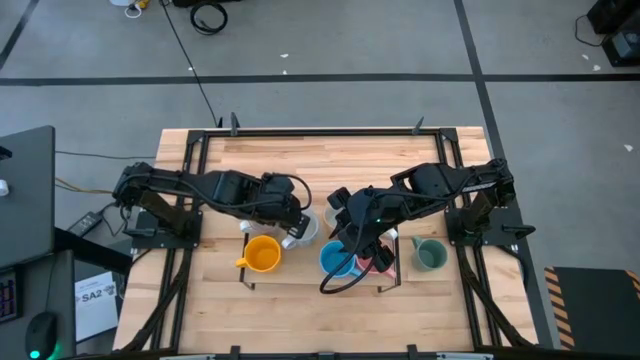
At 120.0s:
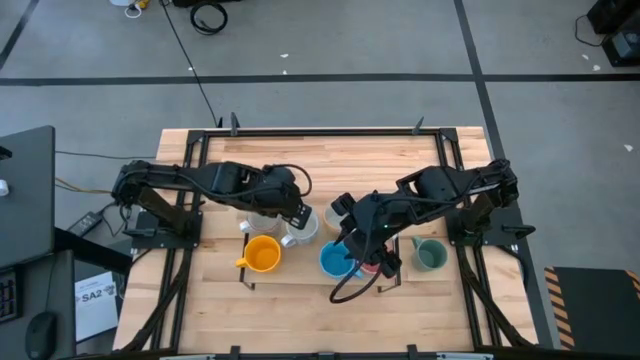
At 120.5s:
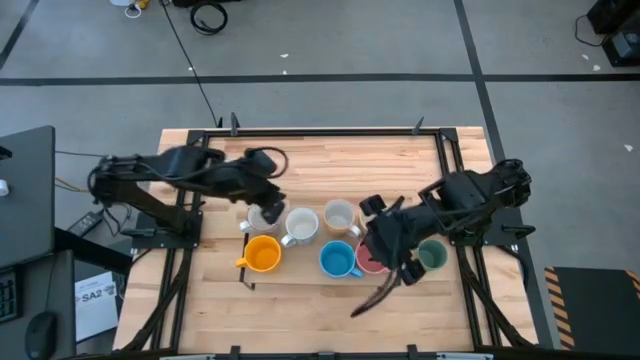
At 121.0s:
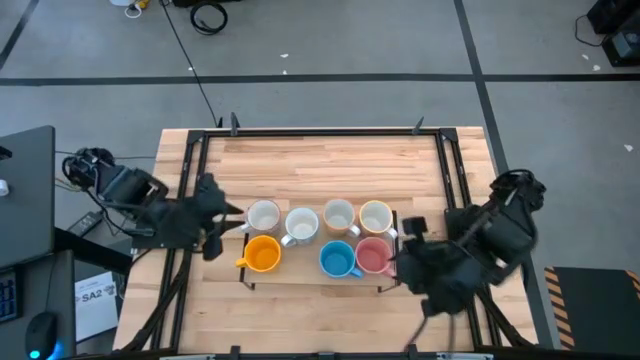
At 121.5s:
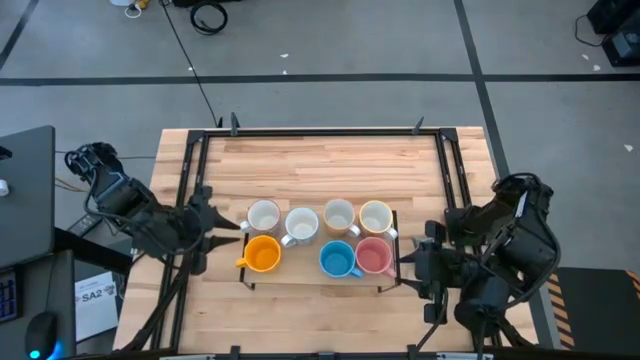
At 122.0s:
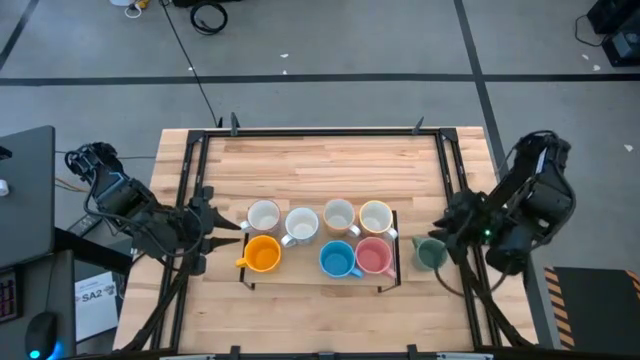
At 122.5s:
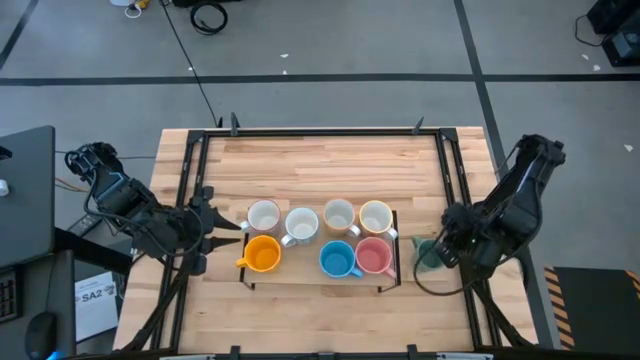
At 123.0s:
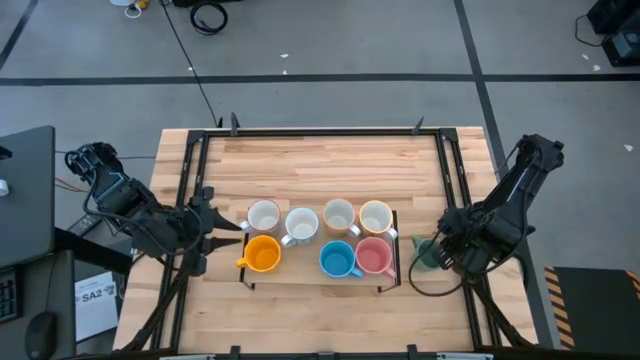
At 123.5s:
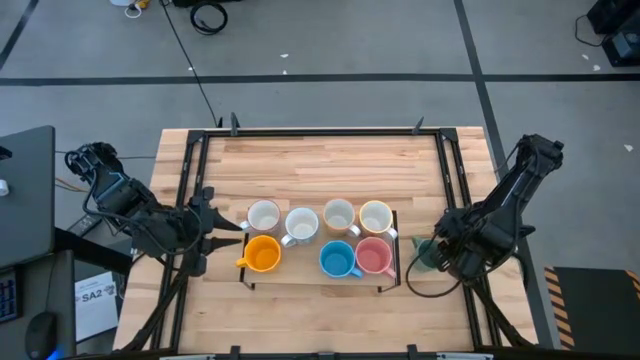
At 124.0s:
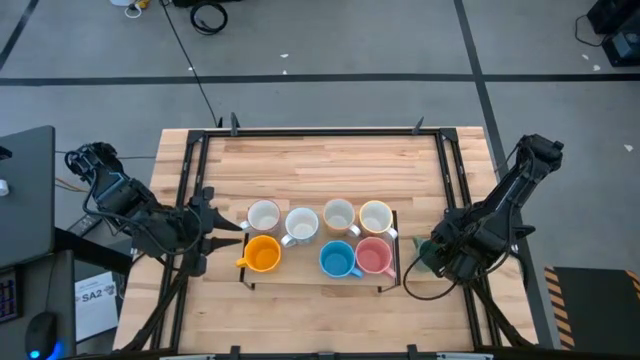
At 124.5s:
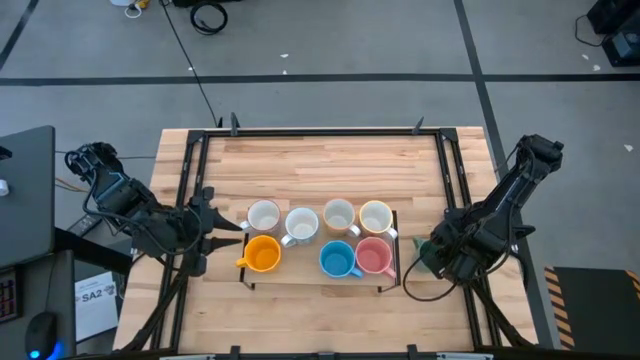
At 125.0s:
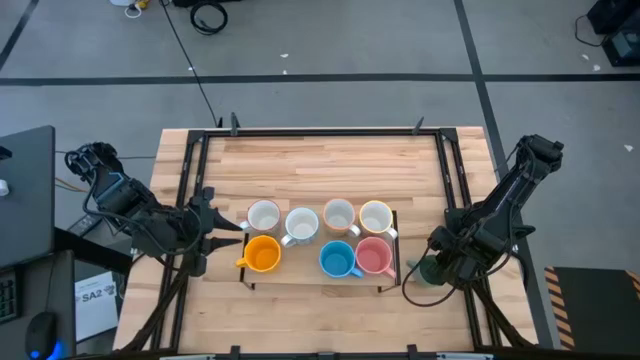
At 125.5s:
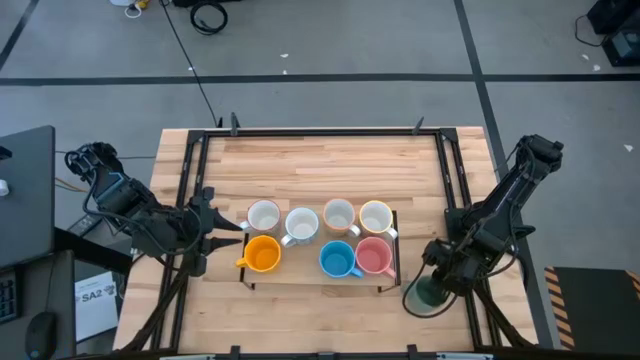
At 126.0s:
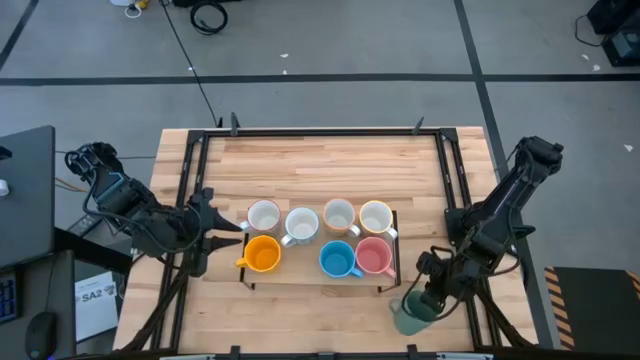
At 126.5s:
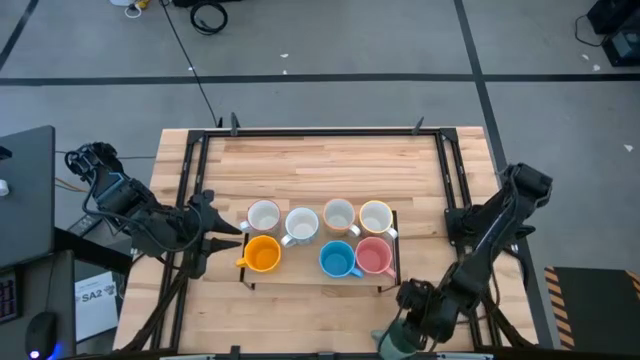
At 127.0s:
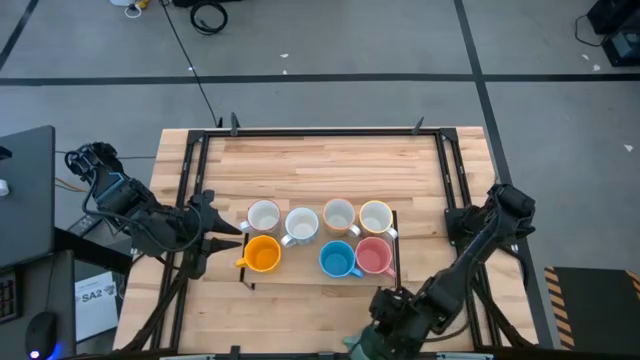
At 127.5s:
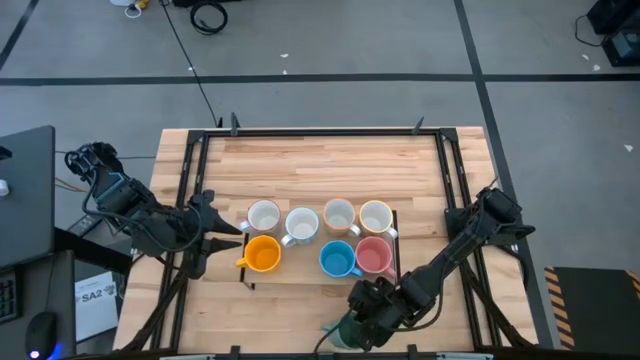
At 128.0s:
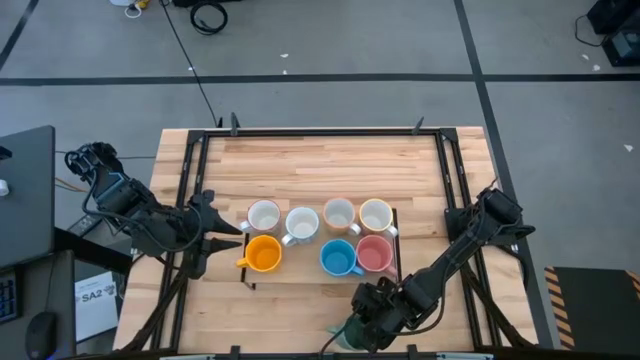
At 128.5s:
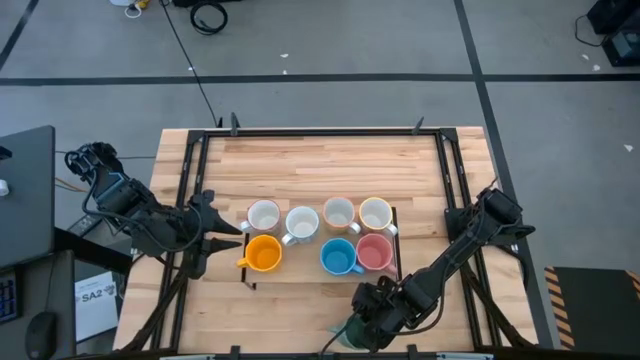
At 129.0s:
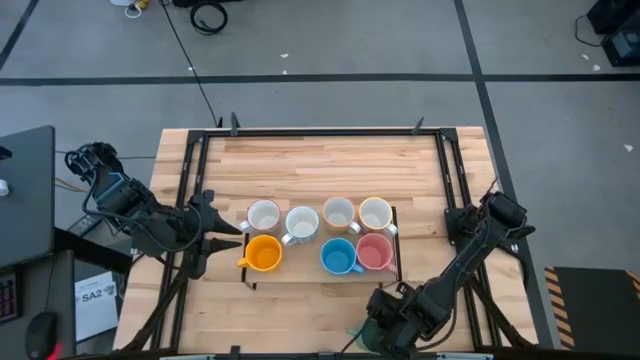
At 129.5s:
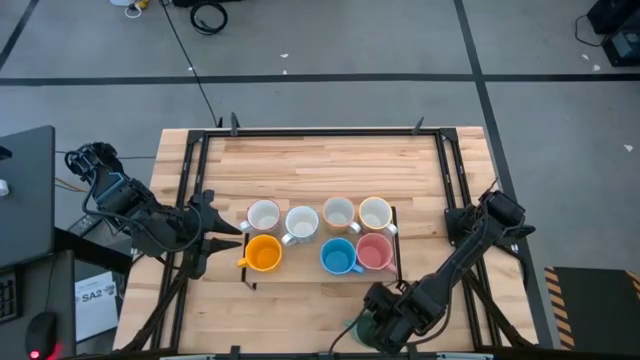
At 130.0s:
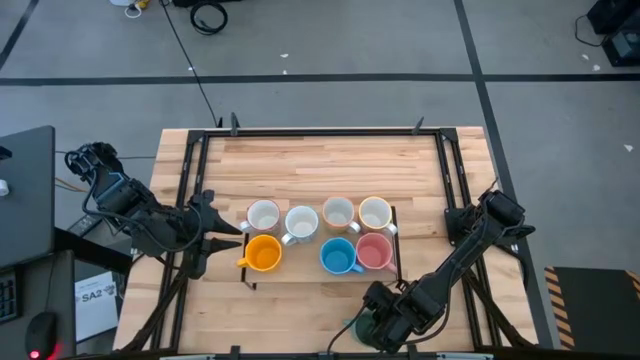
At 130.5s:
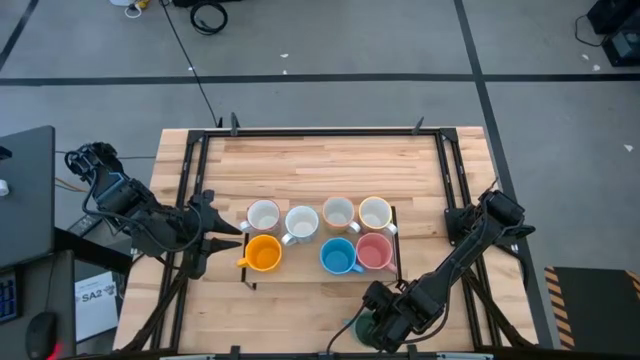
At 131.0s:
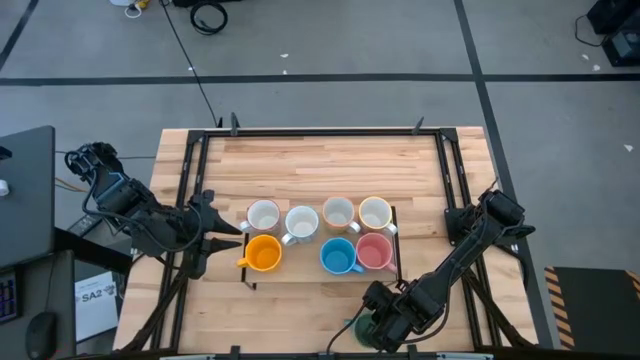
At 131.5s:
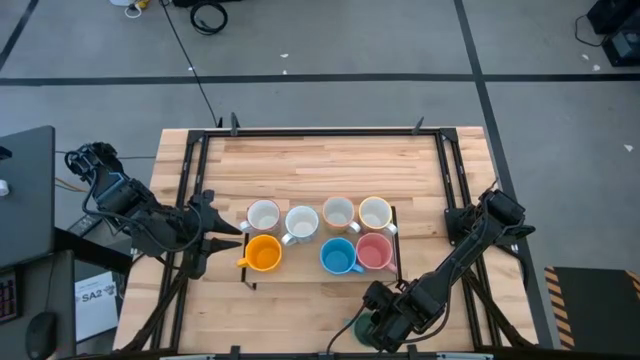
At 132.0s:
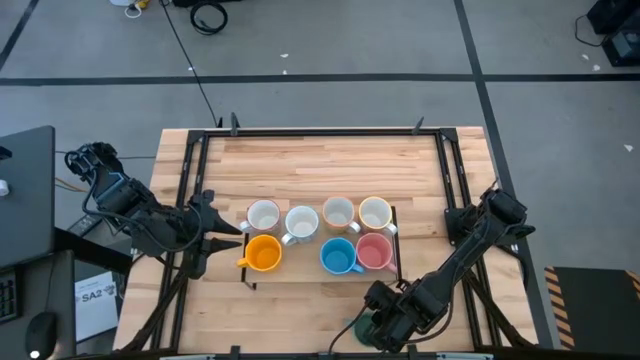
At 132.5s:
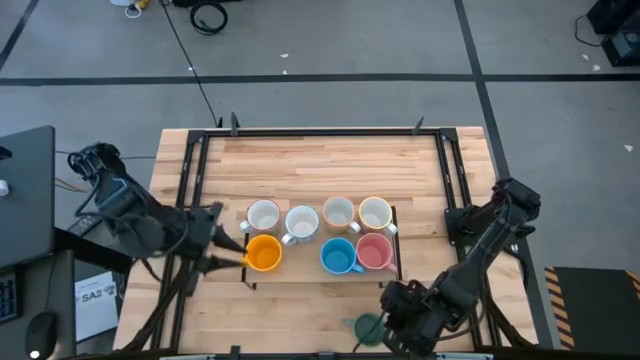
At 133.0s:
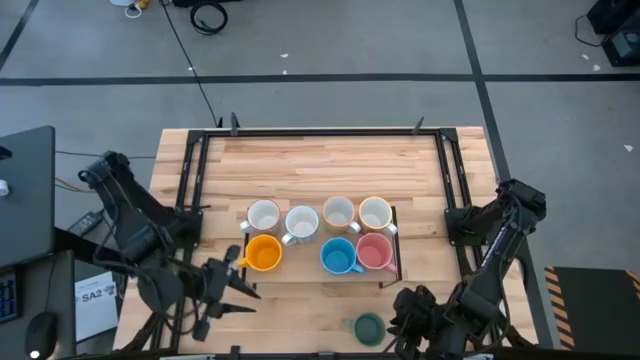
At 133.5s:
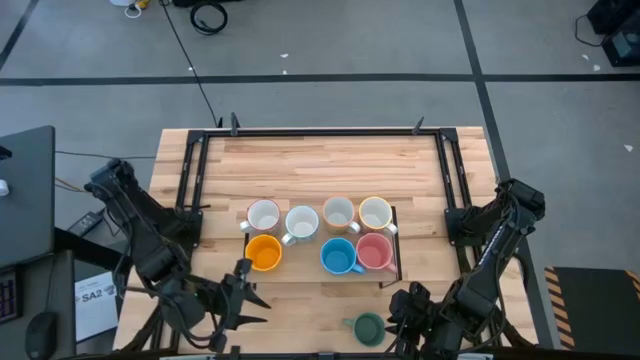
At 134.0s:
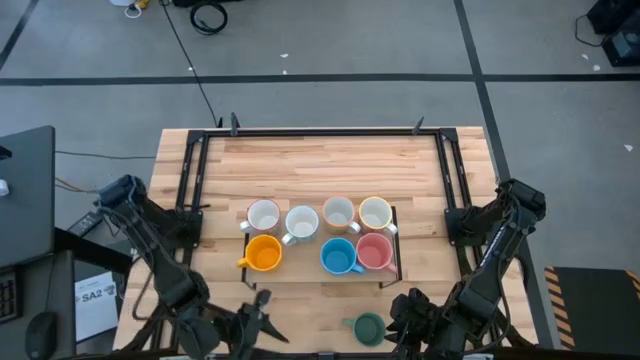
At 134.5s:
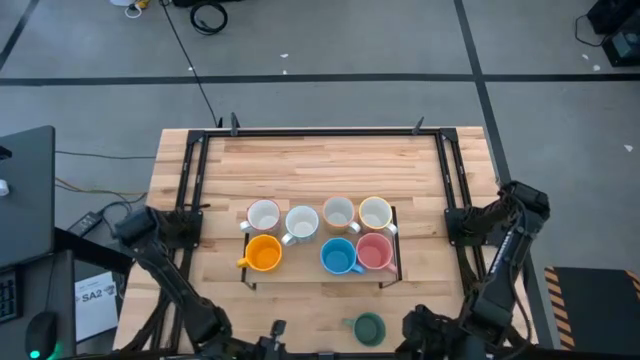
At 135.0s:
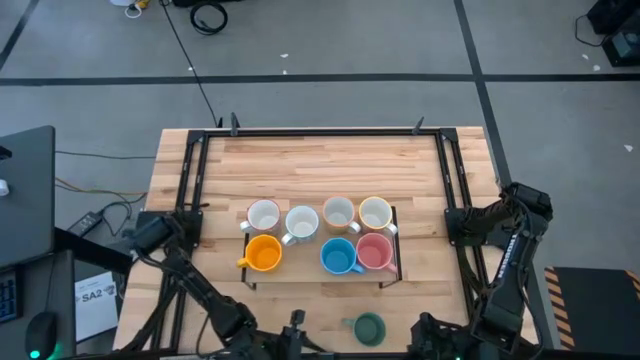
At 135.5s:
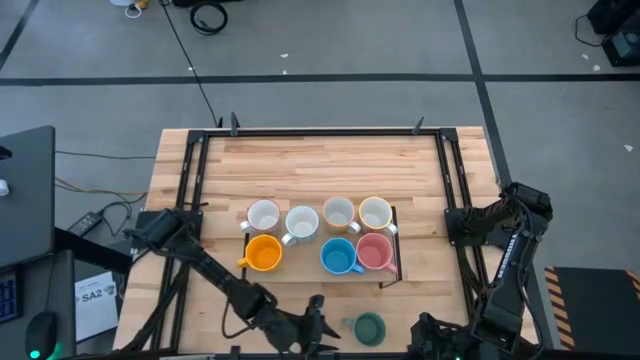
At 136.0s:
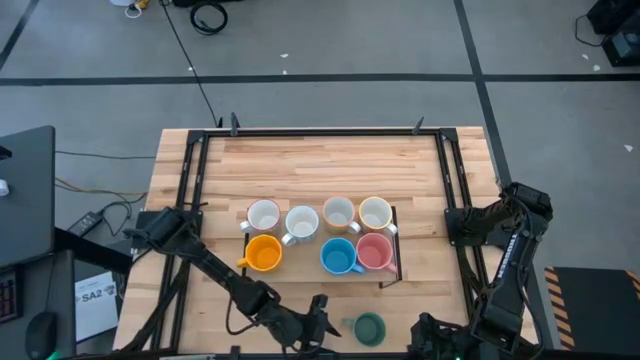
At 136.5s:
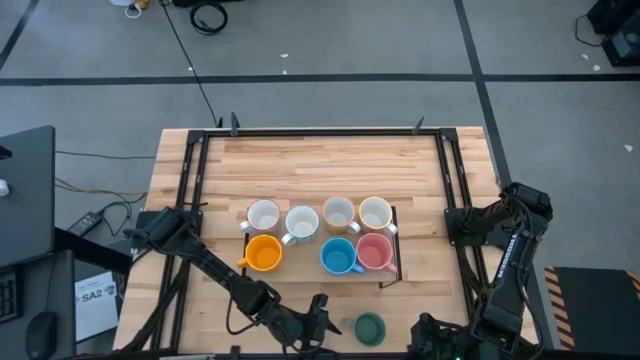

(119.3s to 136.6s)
Task: Place coffee mugs
Put the green mug on the shelf

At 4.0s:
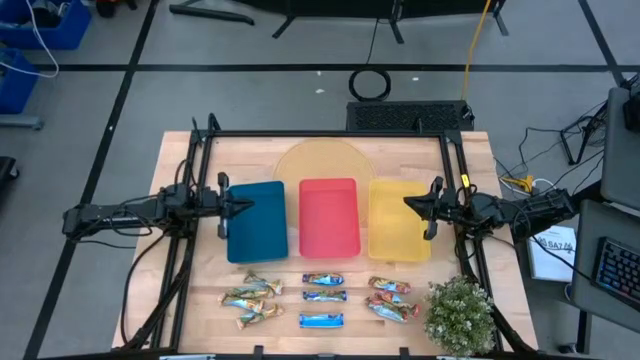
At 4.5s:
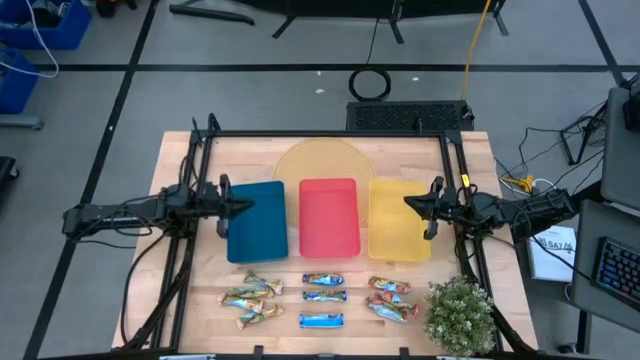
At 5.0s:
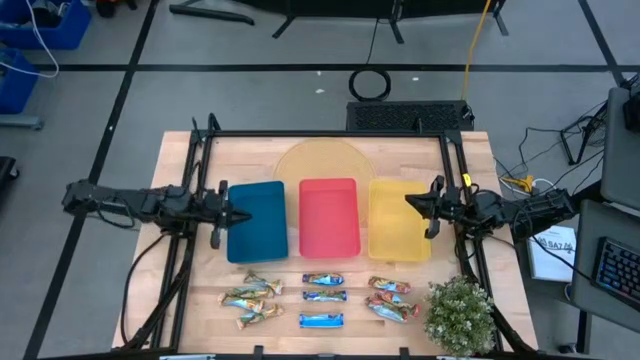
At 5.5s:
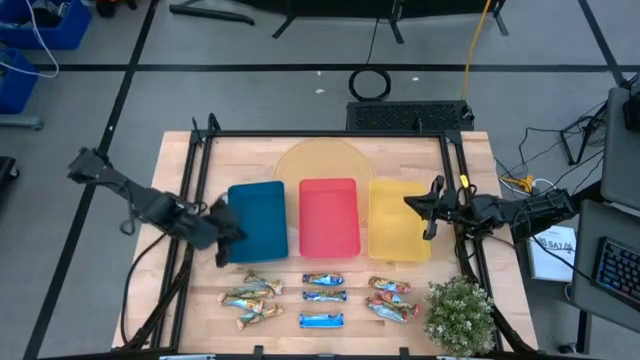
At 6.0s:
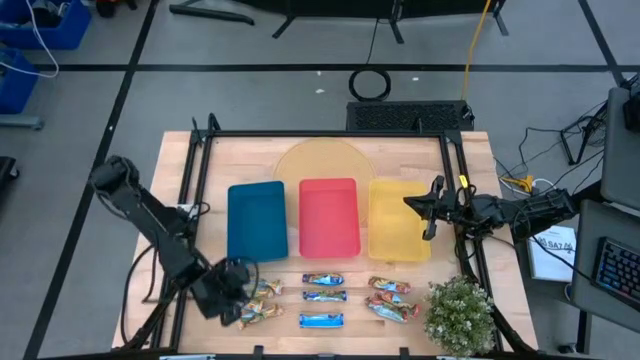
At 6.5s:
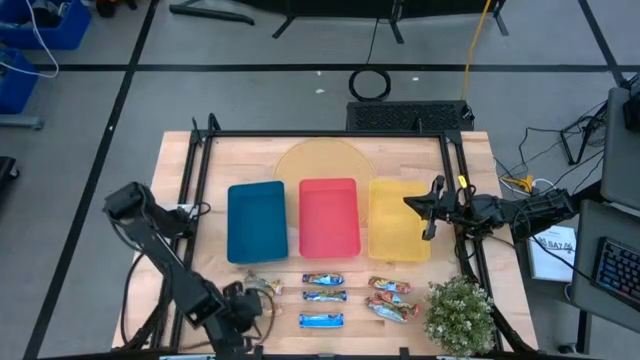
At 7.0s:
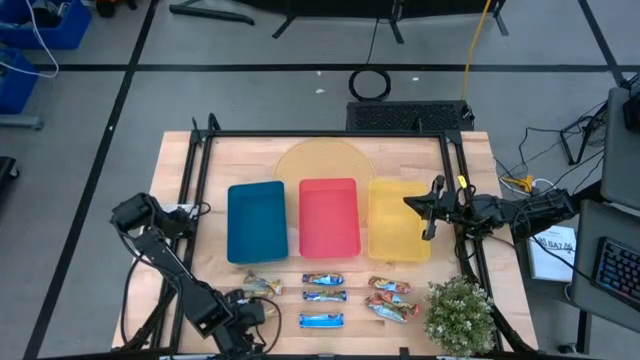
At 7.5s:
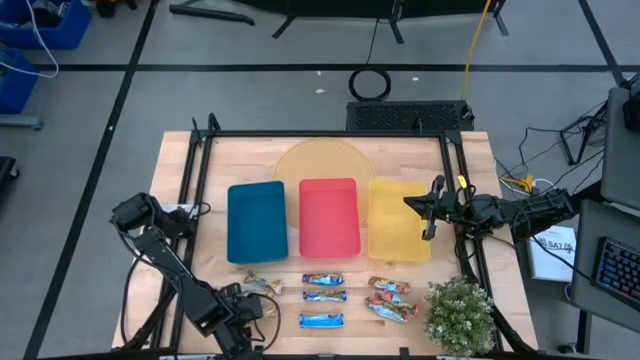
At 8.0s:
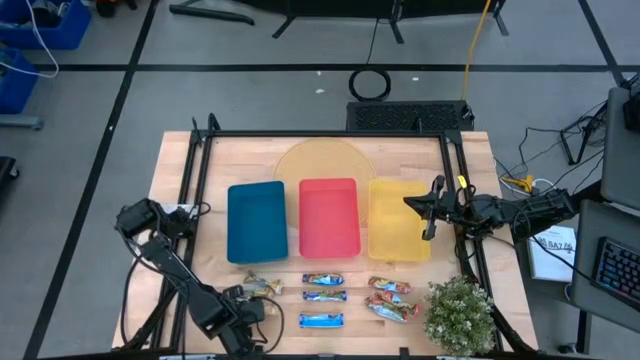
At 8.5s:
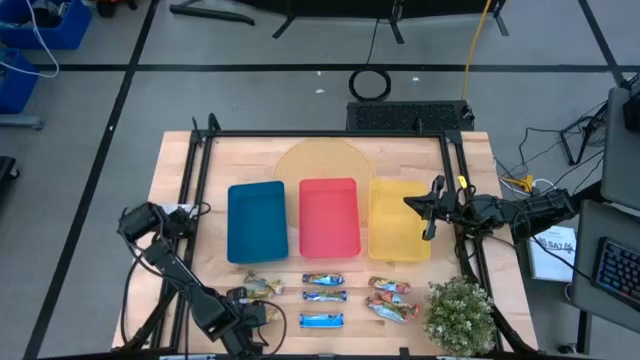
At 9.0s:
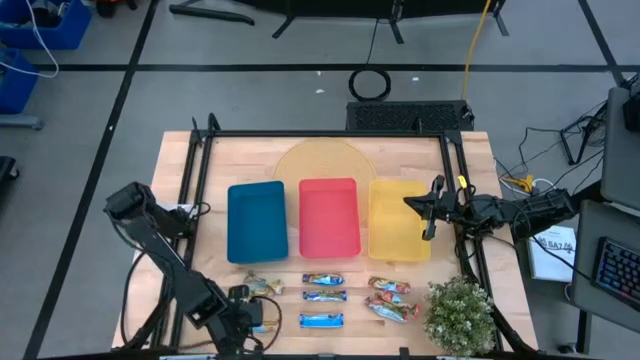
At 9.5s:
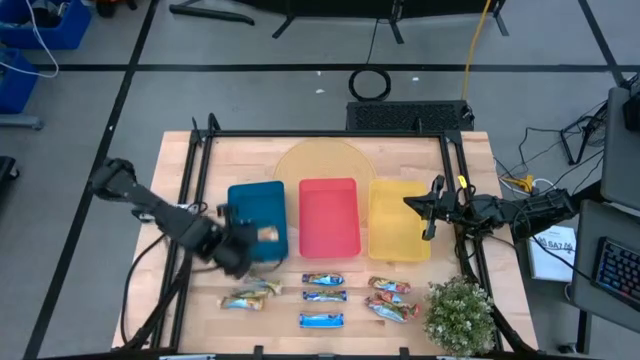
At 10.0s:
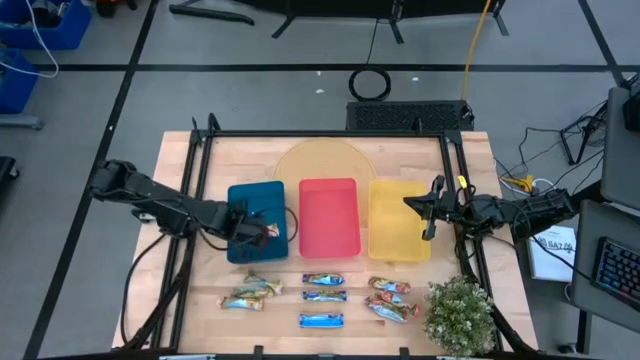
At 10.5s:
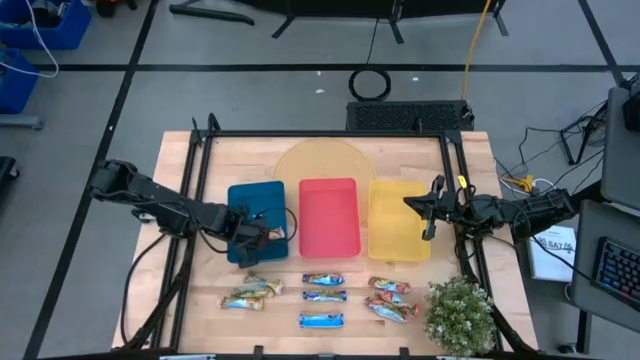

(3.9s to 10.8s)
Task: Pick and place Granola Bars by type
Put the green granola bar into the blue bin
